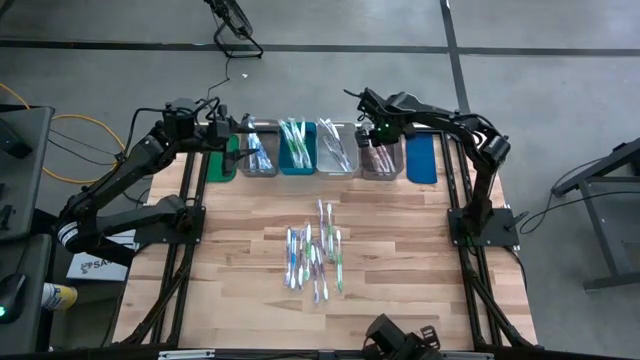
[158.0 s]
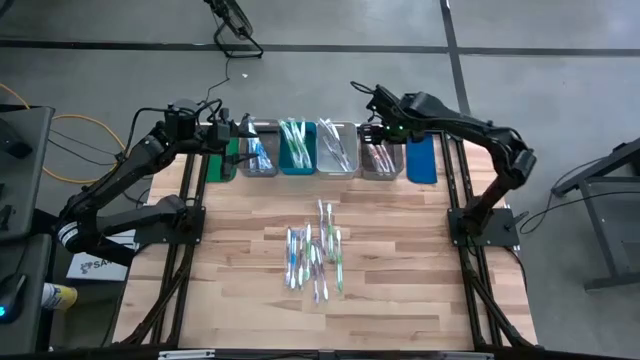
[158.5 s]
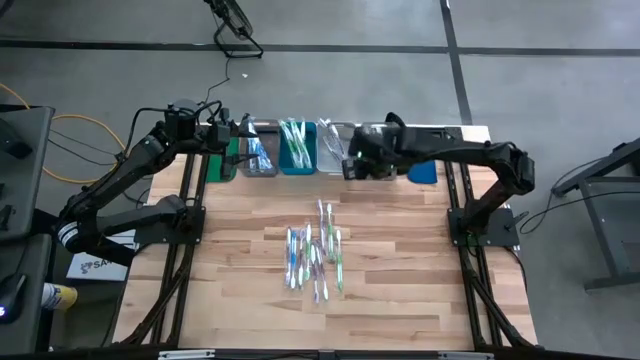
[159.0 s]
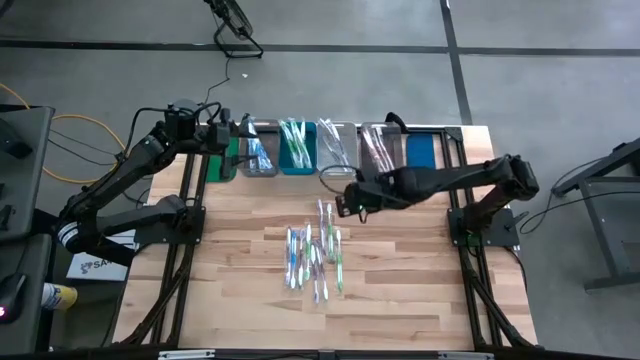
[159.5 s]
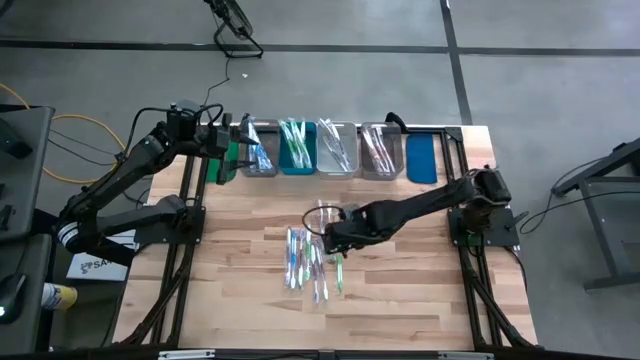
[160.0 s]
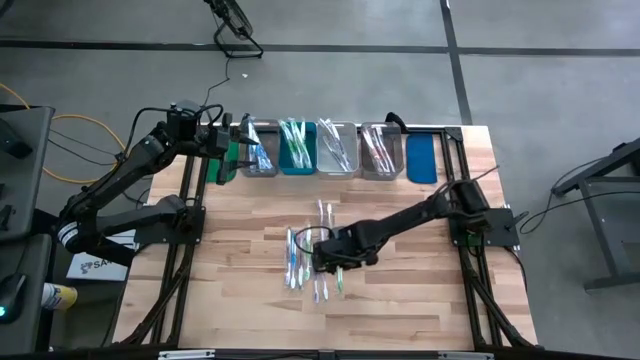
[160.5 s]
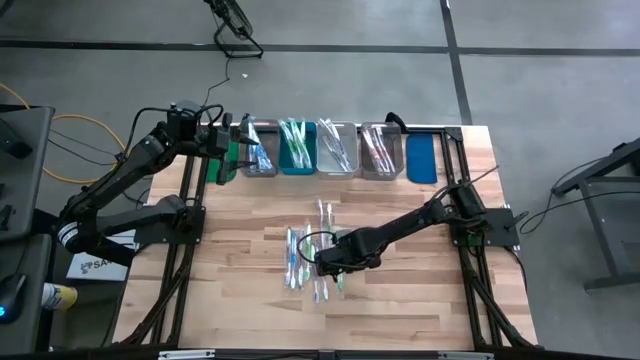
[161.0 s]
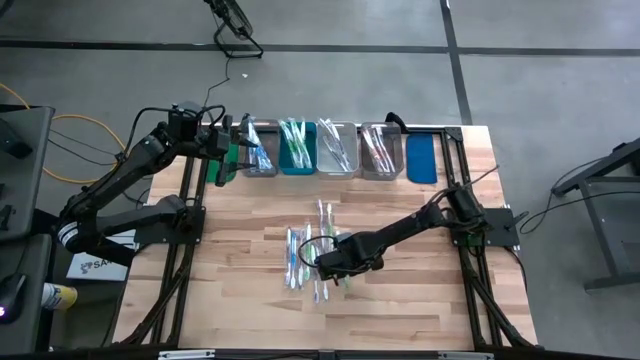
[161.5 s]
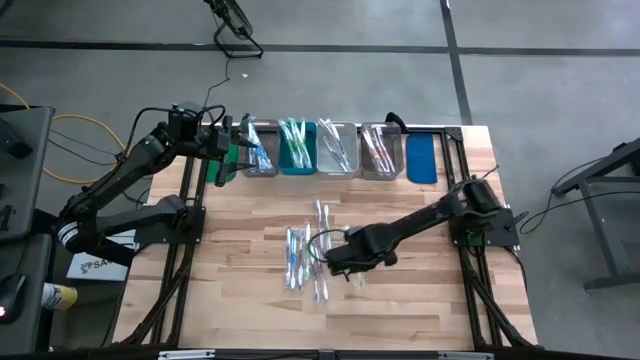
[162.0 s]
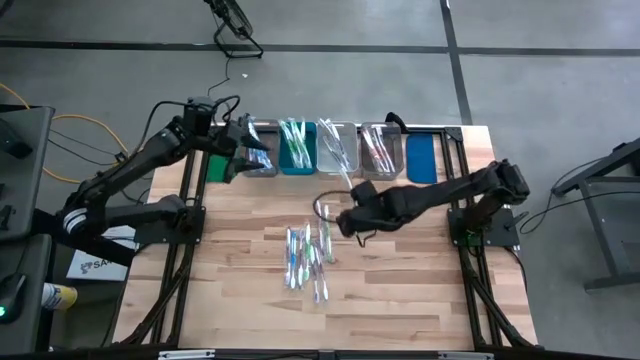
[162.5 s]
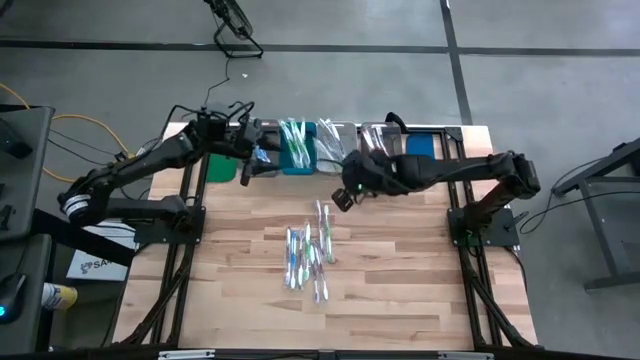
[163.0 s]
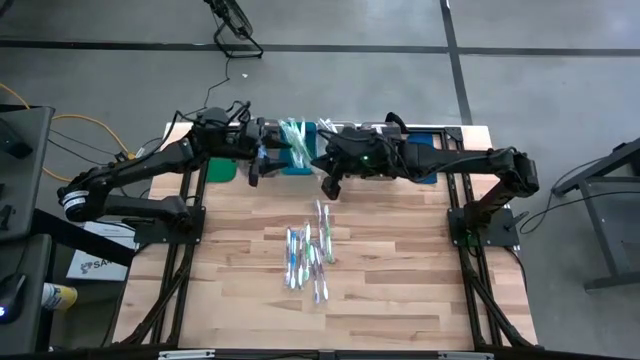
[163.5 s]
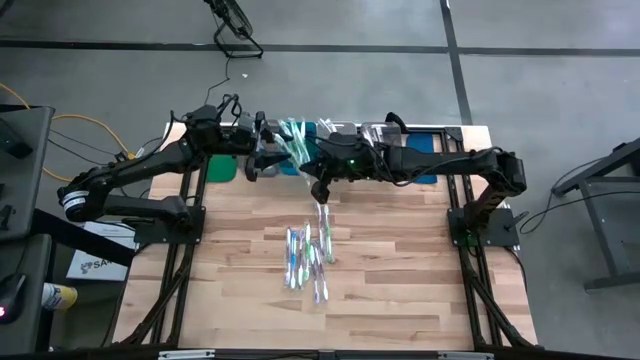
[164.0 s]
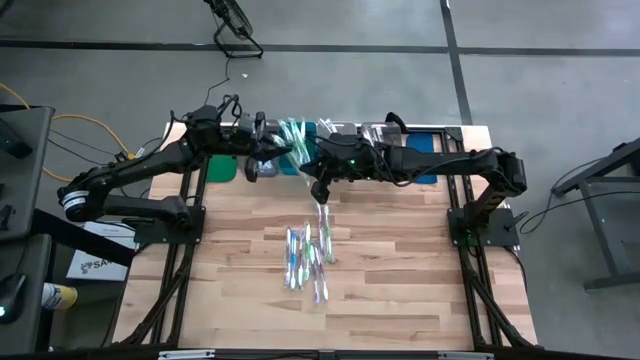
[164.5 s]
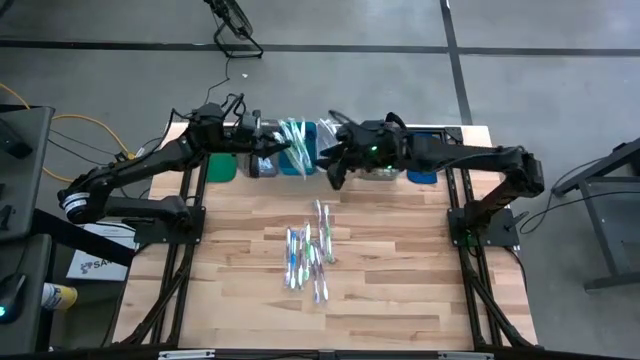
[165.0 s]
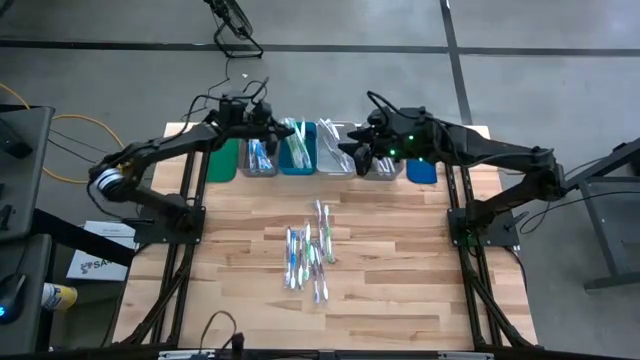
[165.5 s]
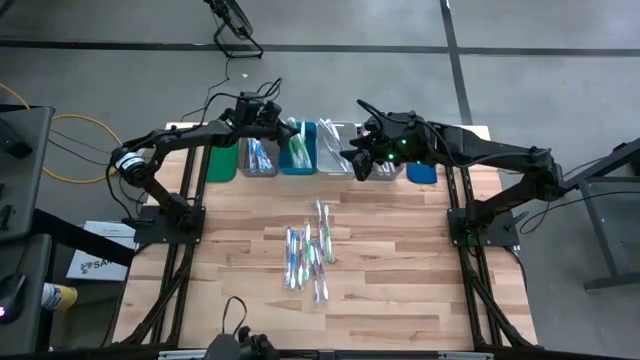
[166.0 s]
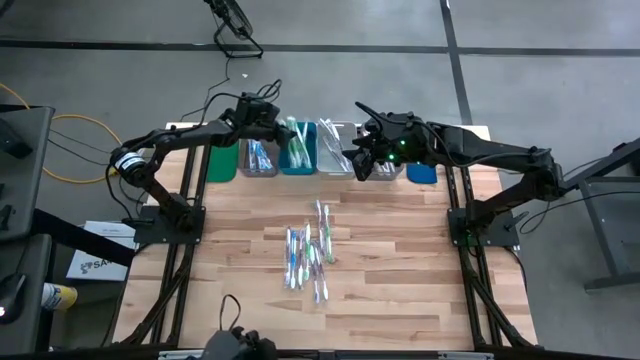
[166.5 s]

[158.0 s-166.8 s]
Task: Pick & Place Toothbrushes
Put the green toothbrush into the blue bin

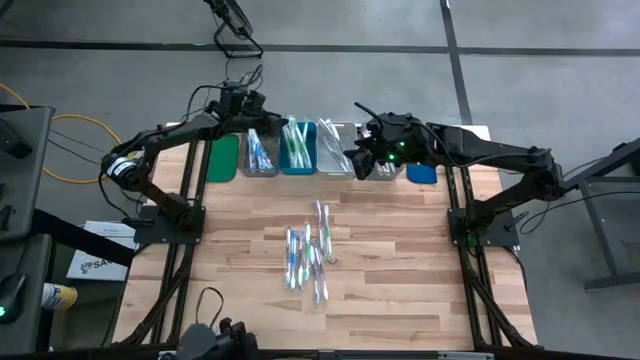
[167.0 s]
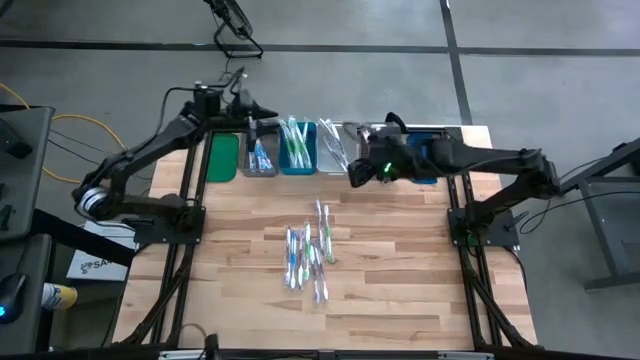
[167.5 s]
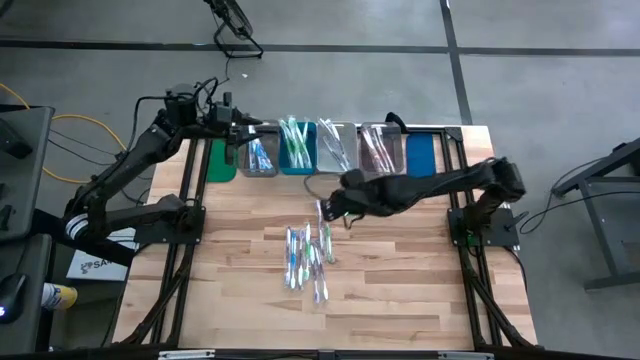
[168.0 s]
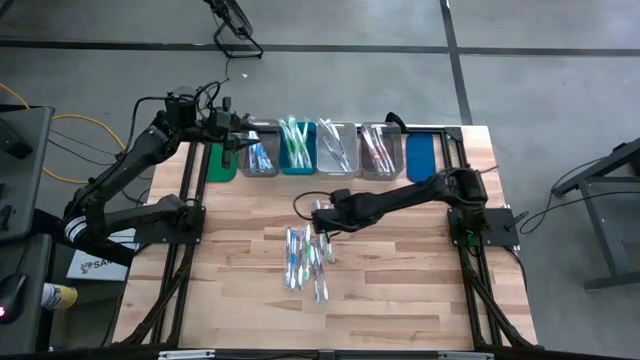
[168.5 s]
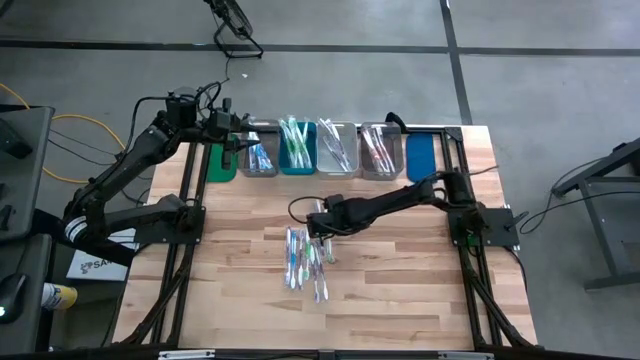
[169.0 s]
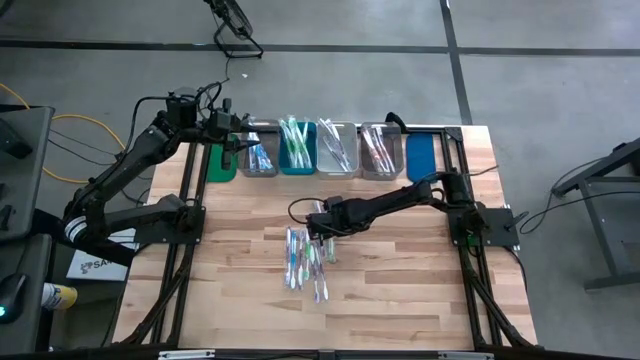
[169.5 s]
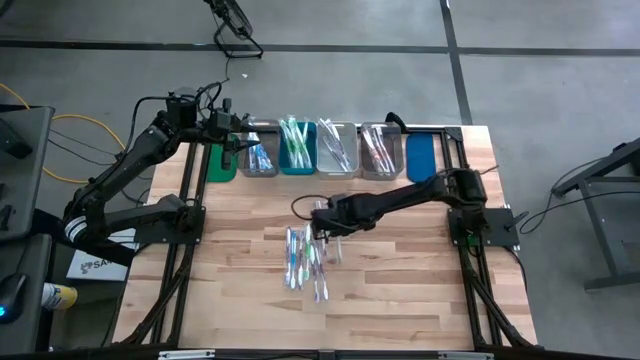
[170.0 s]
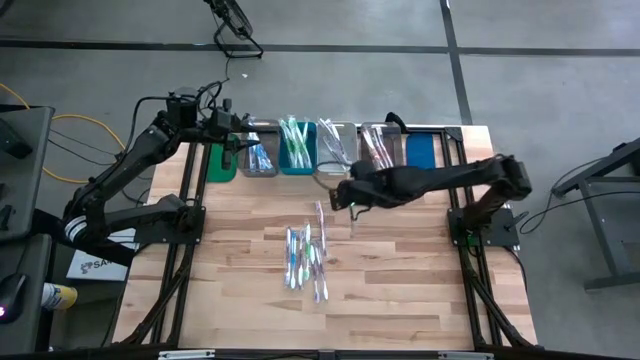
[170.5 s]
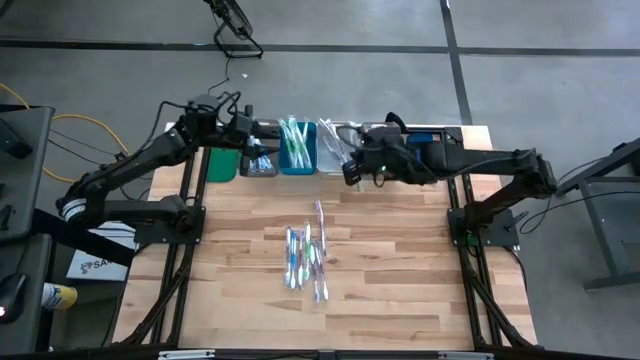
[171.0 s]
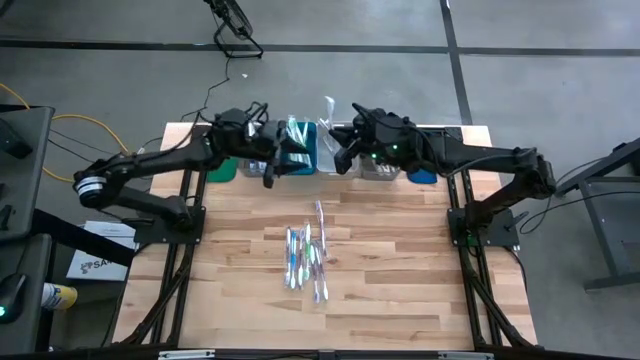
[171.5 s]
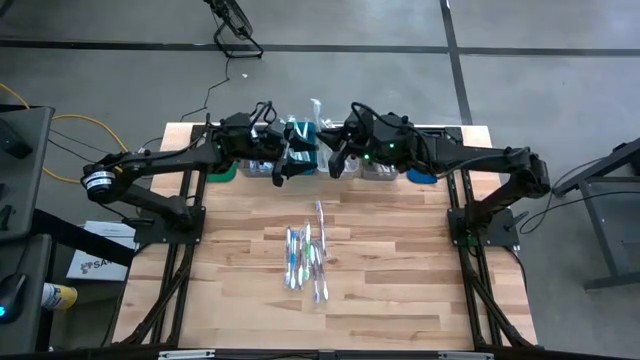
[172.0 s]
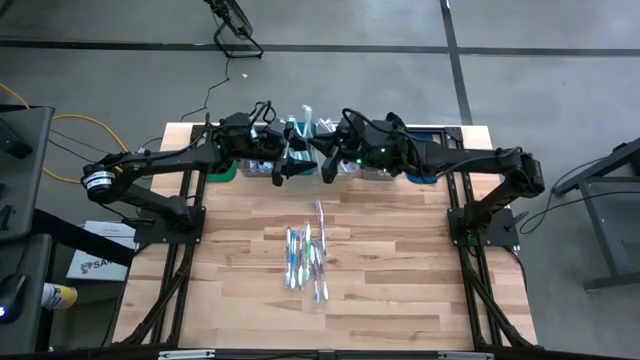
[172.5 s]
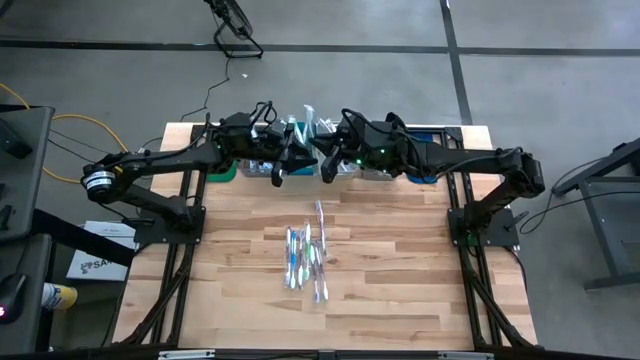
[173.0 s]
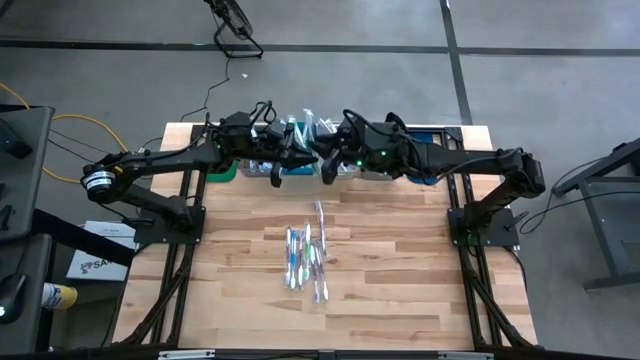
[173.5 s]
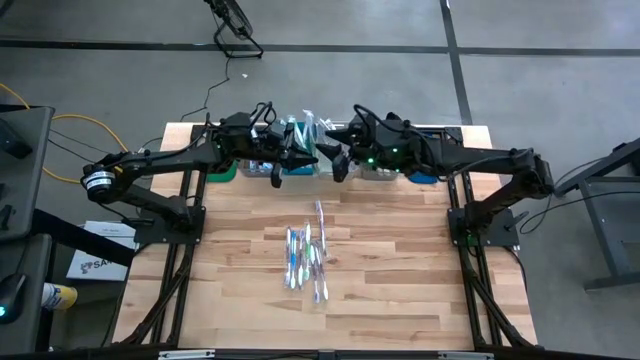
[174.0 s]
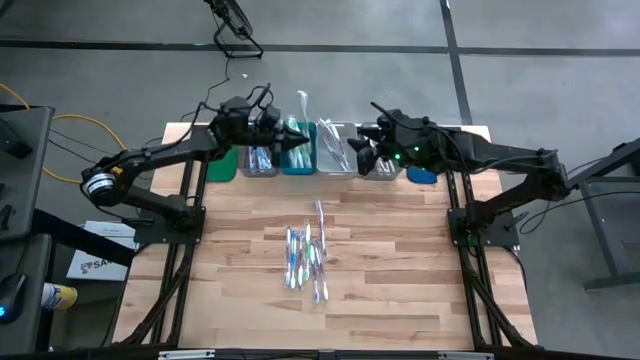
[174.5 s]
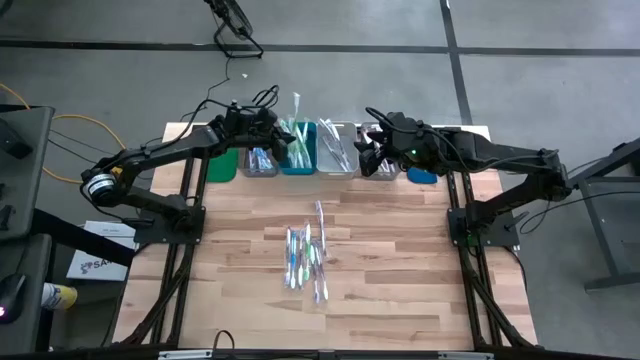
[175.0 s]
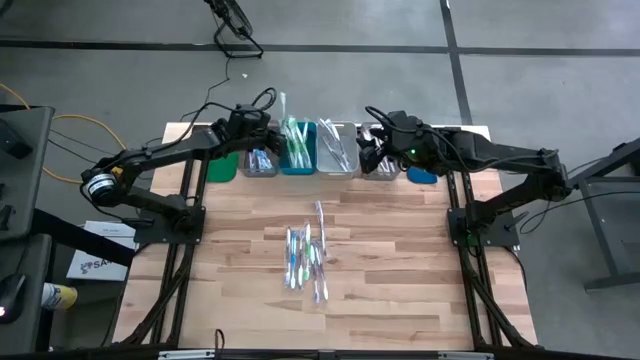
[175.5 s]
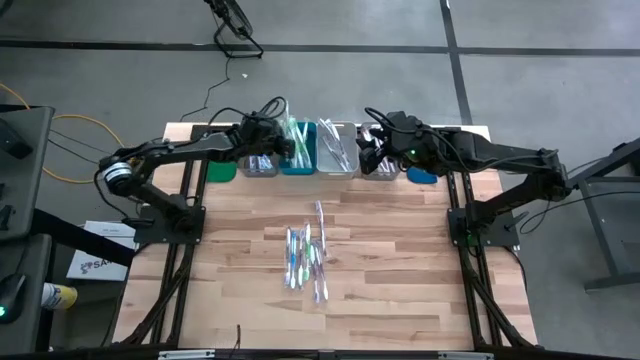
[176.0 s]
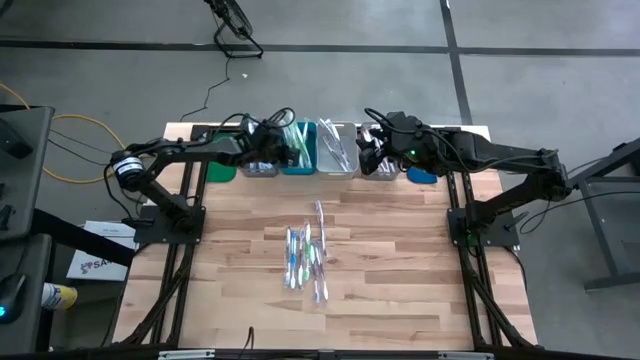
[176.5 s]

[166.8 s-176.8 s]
Put the green toothbrush into the blue bin

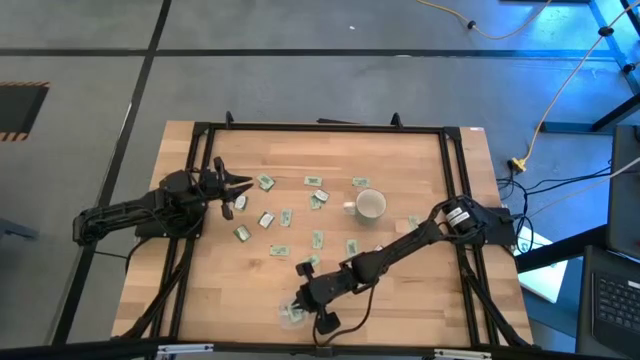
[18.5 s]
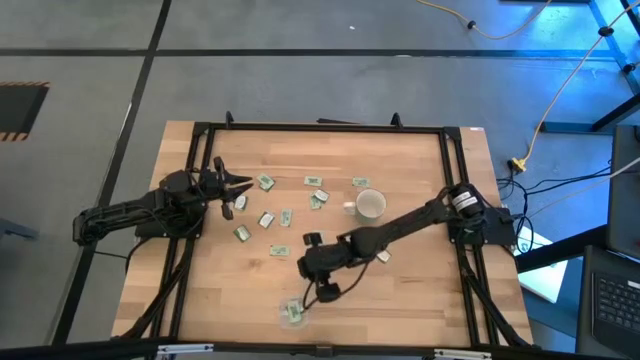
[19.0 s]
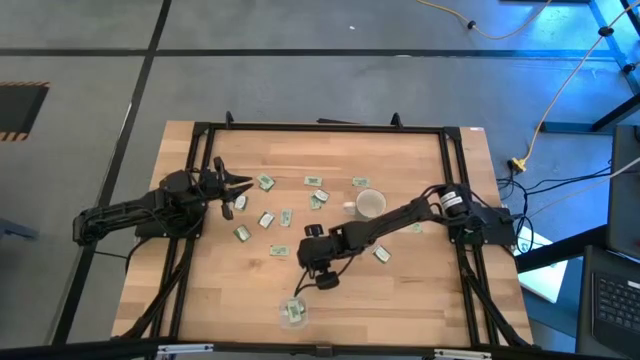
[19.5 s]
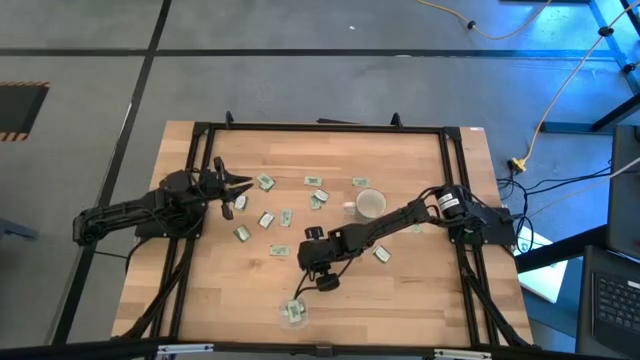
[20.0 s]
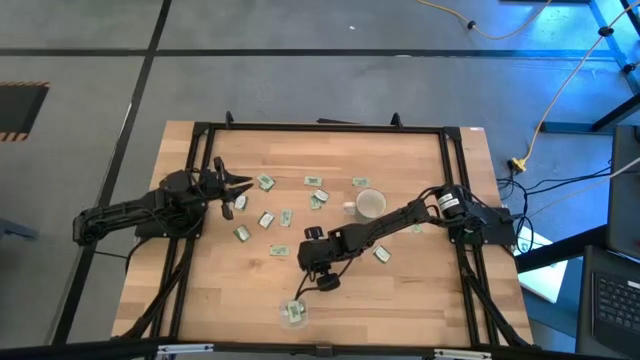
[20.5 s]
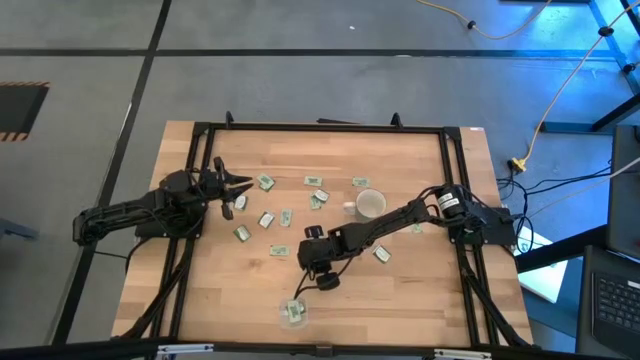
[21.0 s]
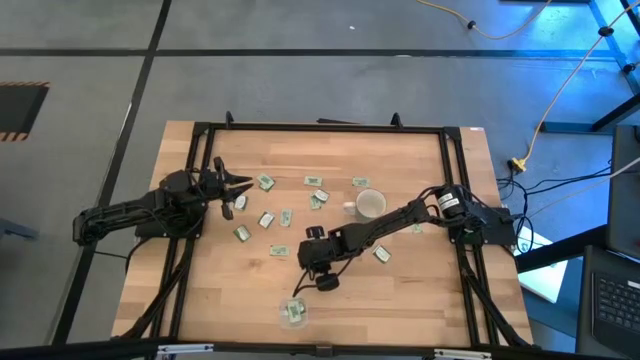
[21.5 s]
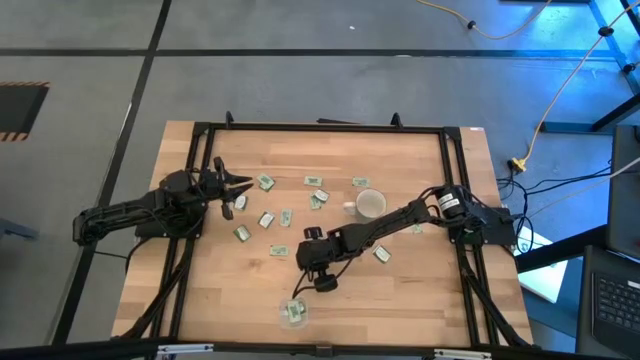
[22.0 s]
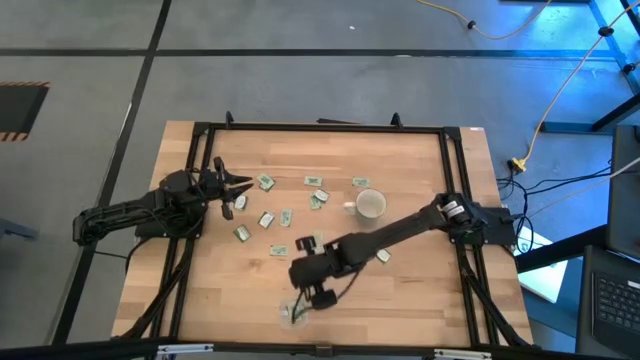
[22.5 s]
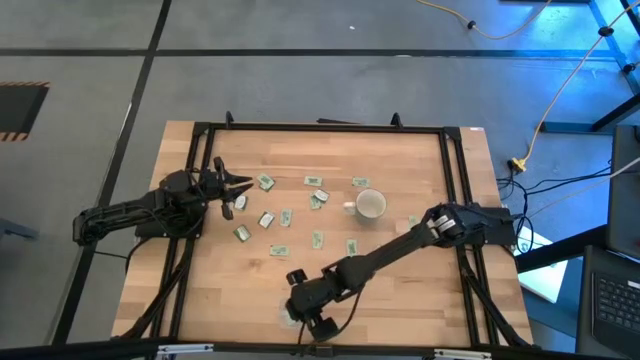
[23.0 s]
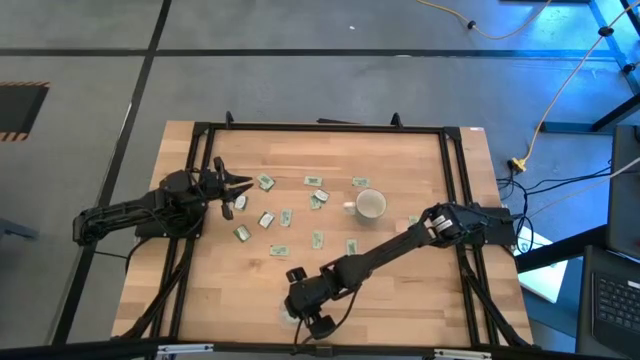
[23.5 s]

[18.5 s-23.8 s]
Task: Pick and place Stevia / Truvia into bins
Put the light green stevia packet into the transparent bin
